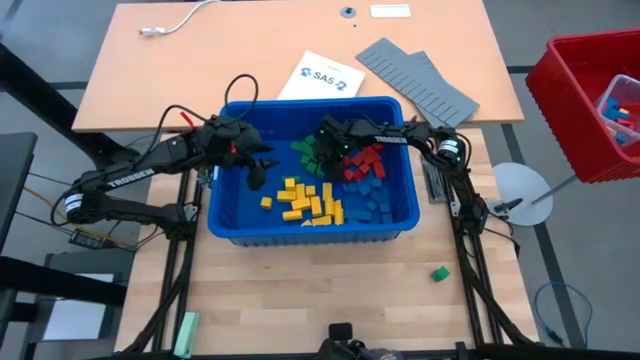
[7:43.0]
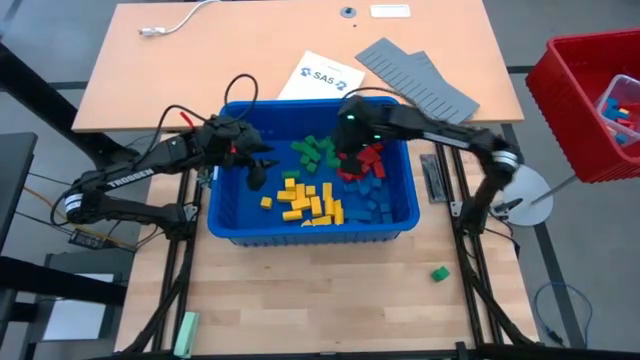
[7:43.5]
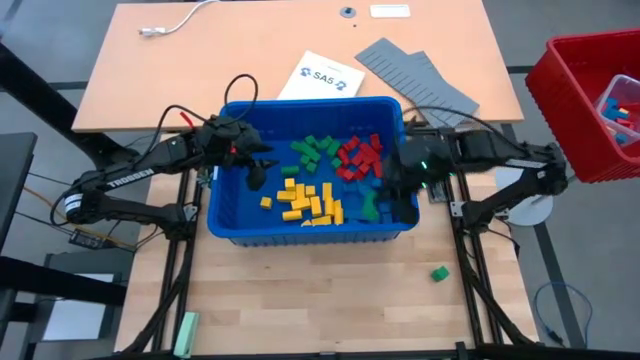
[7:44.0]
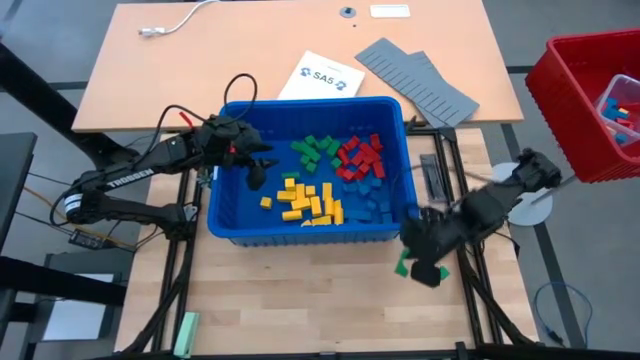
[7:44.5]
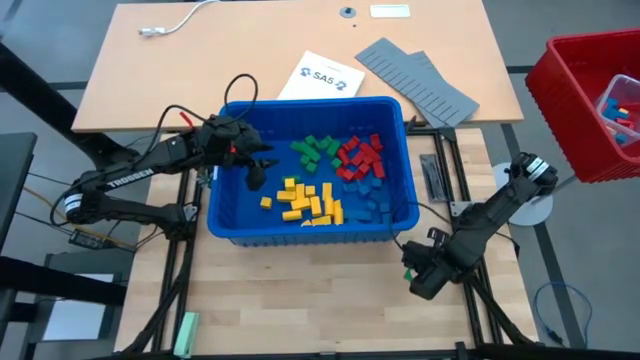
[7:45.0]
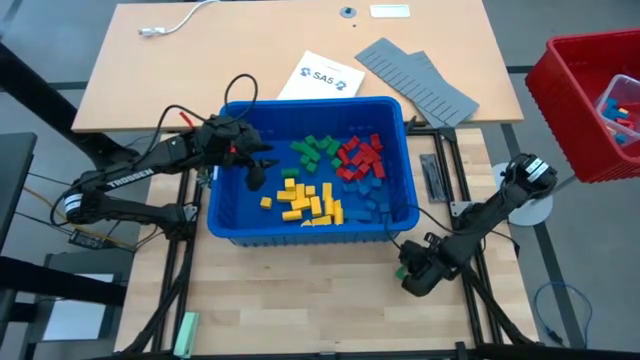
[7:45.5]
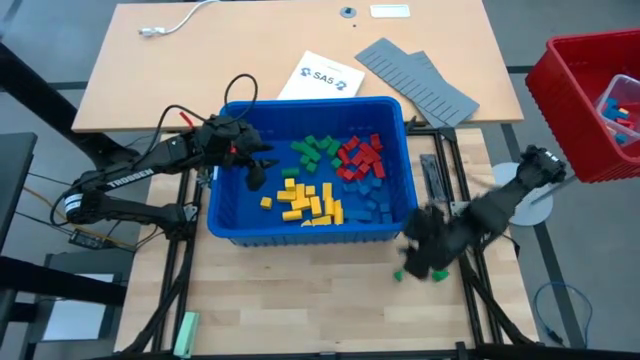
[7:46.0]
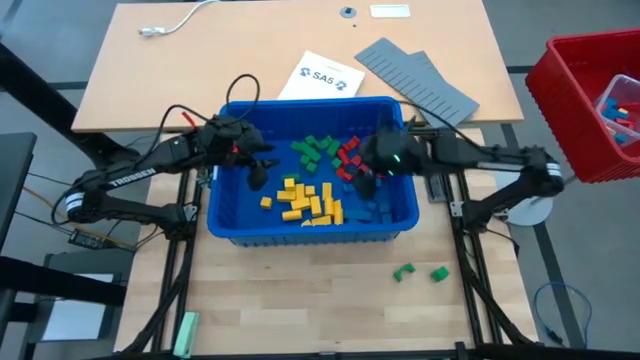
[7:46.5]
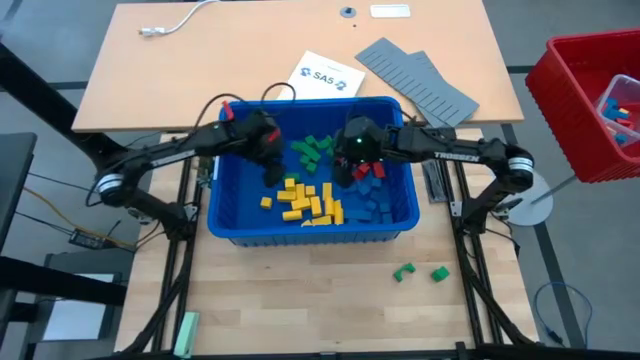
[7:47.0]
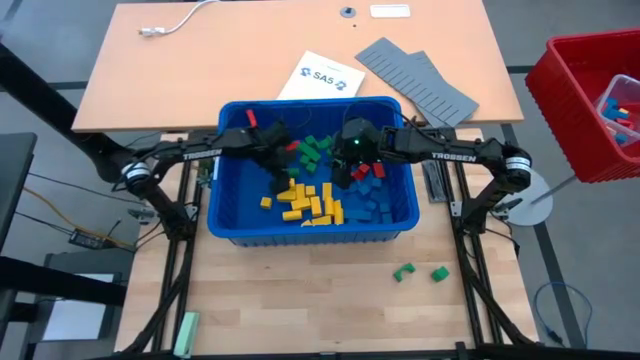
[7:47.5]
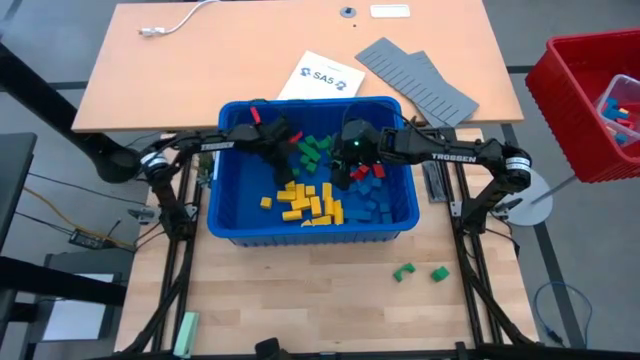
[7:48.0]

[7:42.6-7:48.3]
Task: Sort blocks
Remove the green block from the blue bin

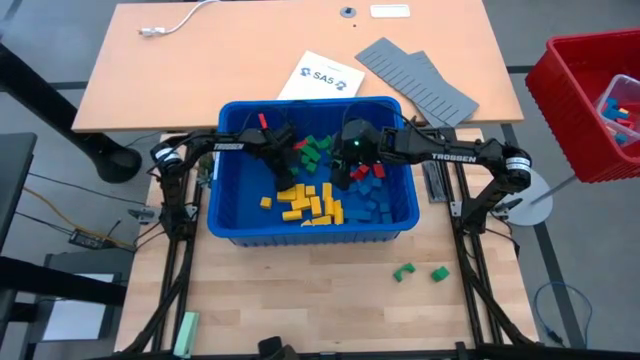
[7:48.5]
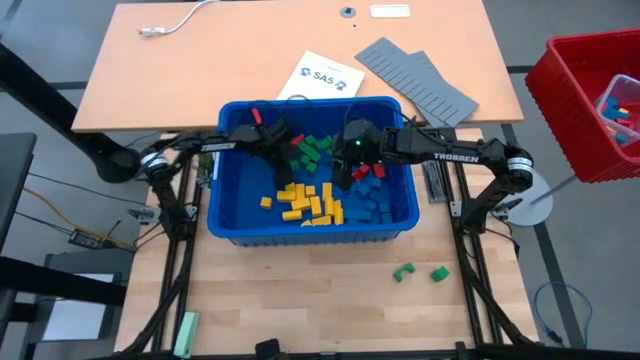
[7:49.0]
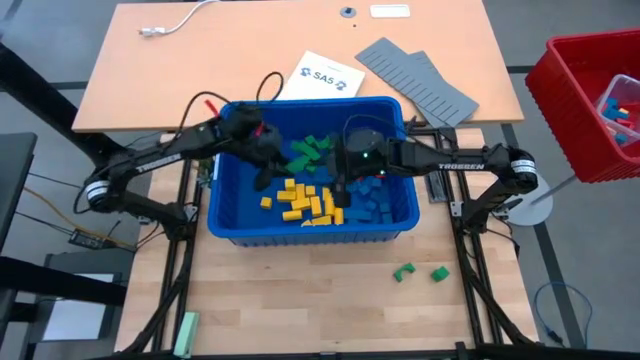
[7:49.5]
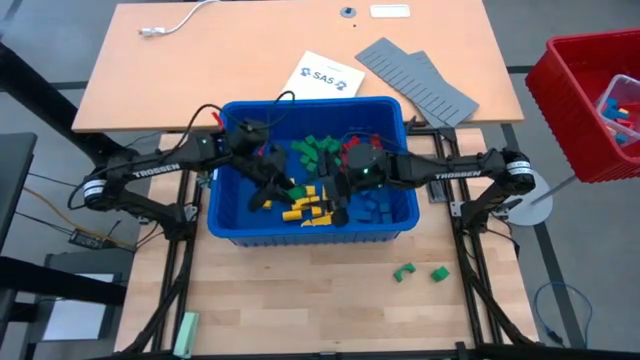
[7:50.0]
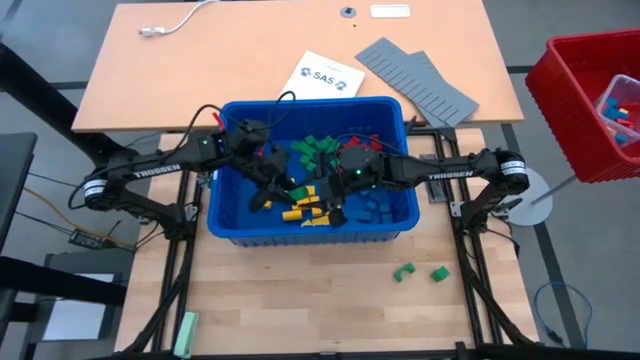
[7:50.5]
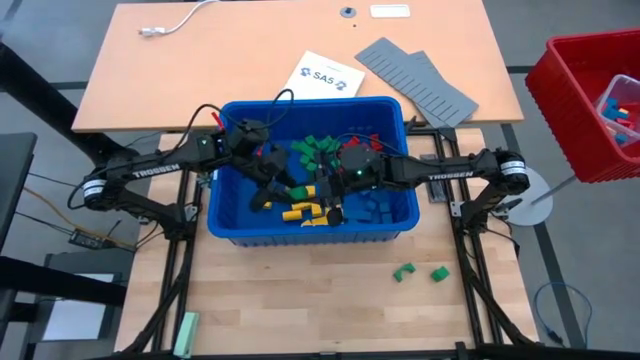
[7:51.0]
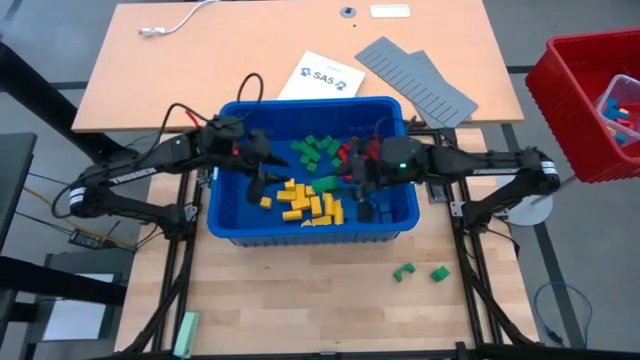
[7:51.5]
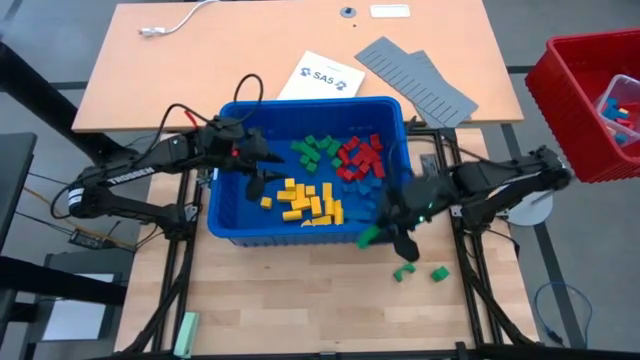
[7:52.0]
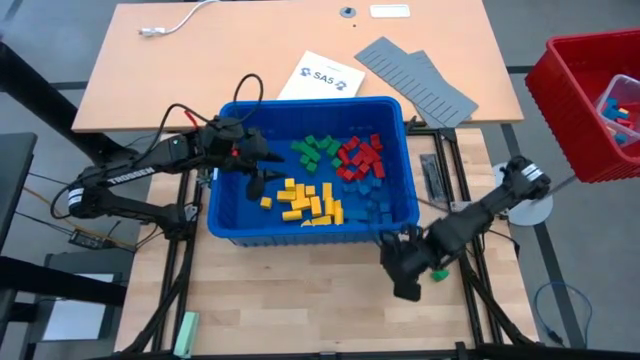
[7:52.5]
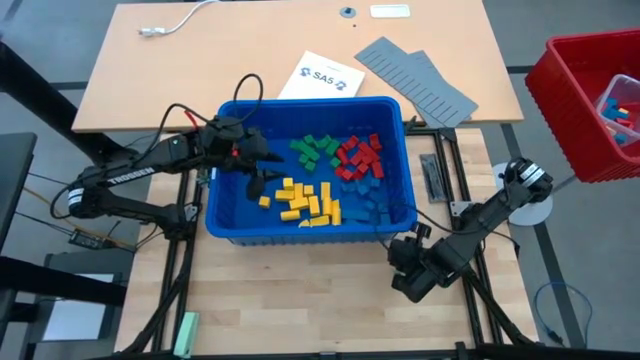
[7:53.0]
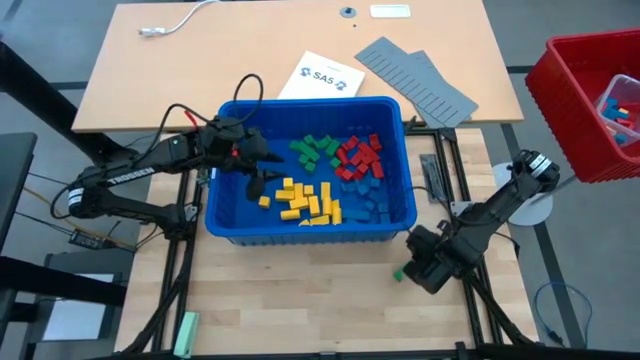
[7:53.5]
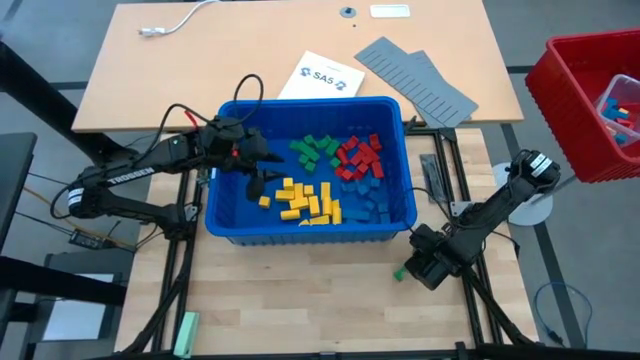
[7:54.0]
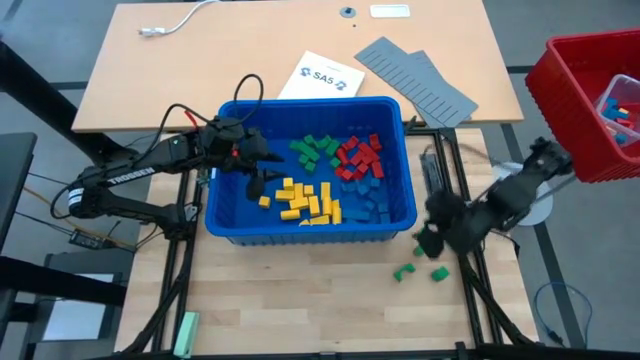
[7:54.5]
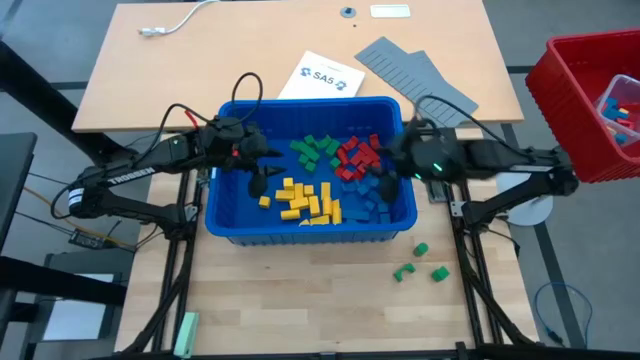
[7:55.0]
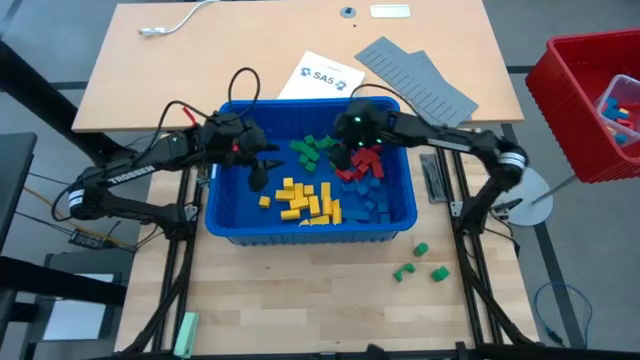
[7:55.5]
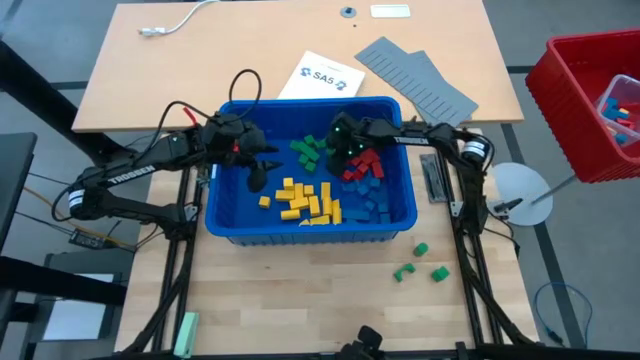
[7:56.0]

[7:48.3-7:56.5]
Remove the green block from the blue bin

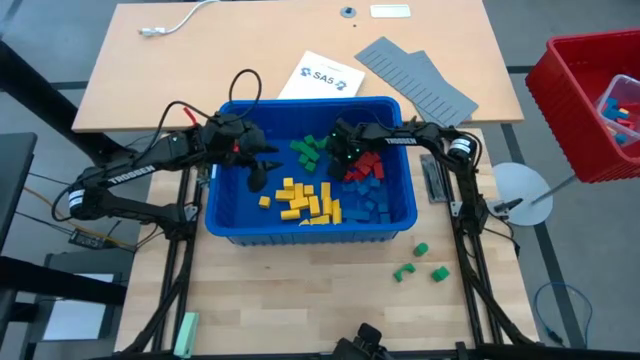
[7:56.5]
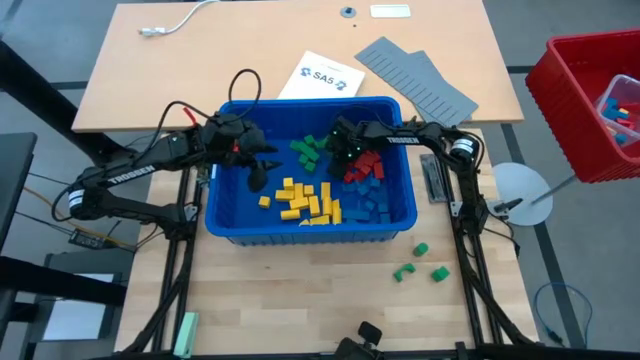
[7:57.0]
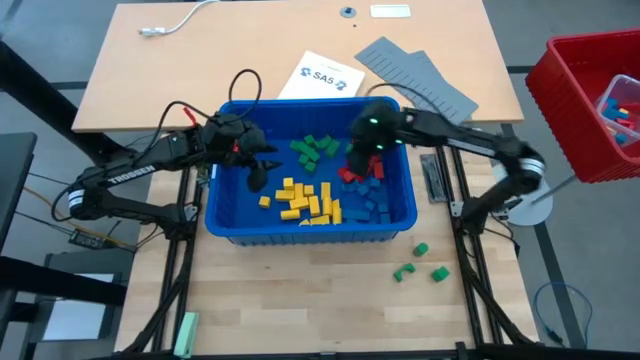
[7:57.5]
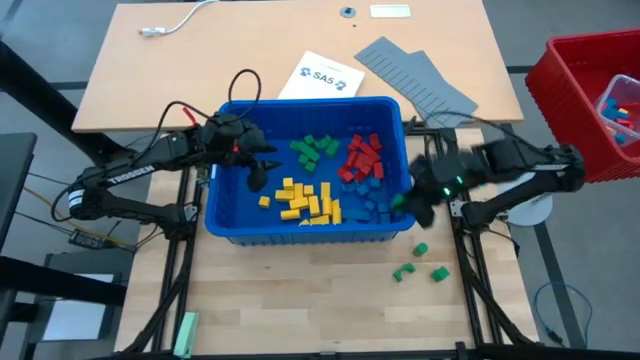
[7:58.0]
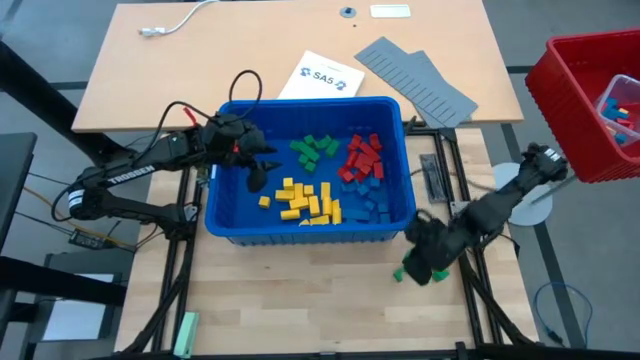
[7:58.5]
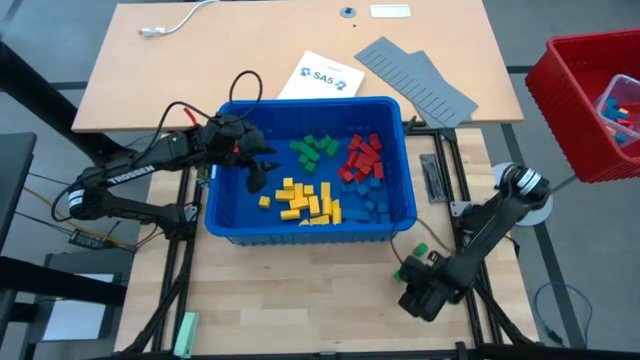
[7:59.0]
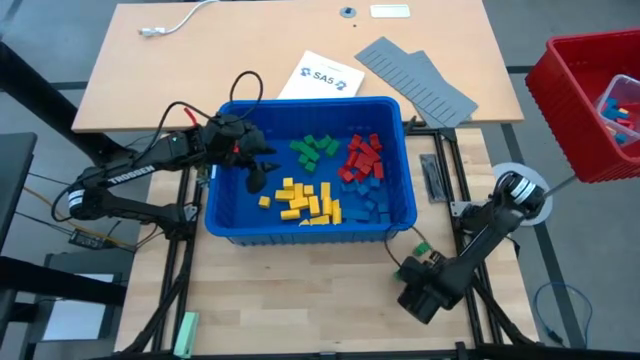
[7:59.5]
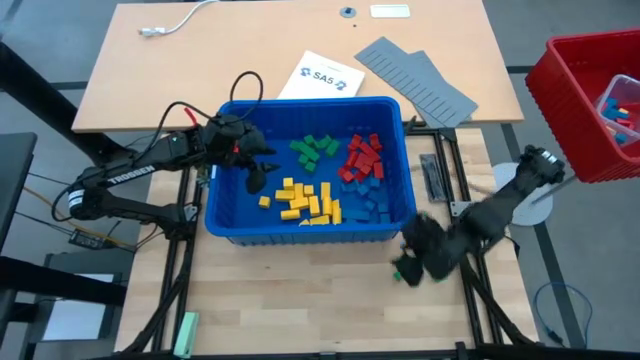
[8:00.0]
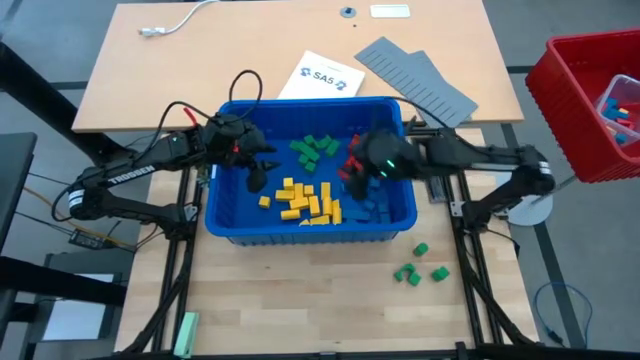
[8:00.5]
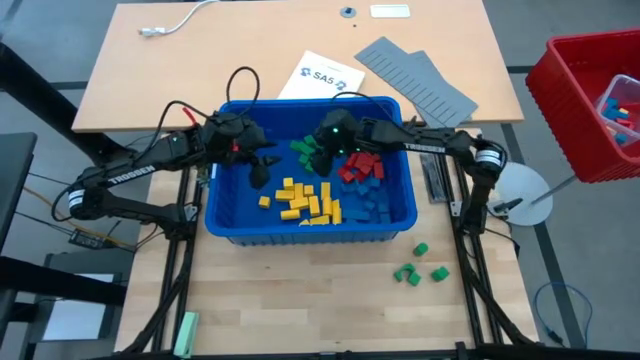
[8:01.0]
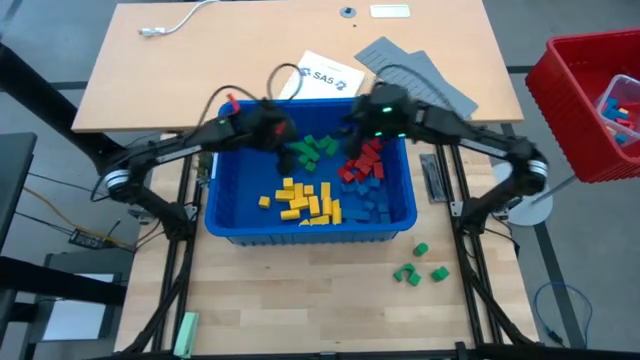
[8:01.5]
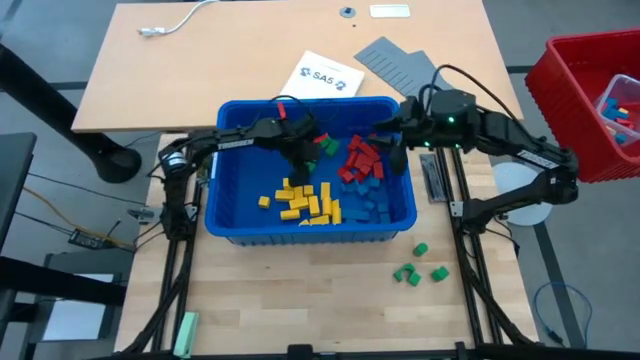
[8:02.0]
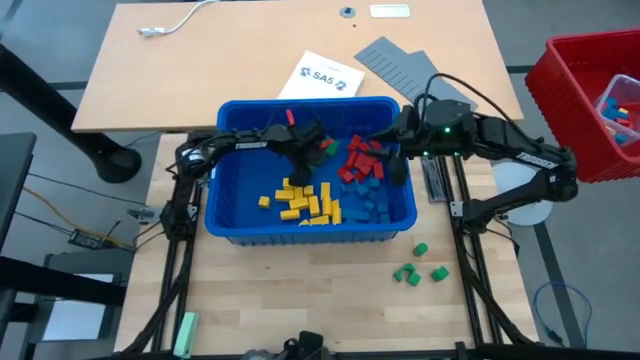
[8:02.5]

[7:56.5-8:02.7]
Remove the green block from the blue bin
